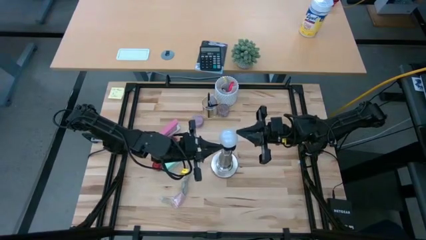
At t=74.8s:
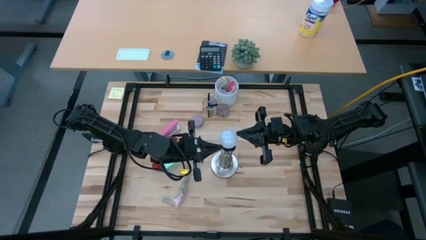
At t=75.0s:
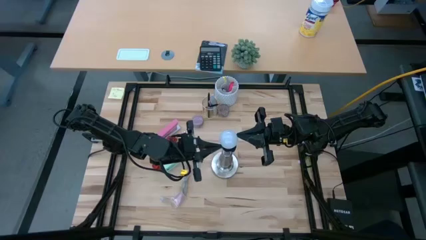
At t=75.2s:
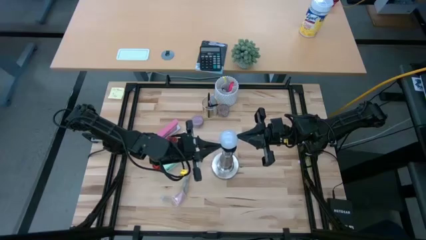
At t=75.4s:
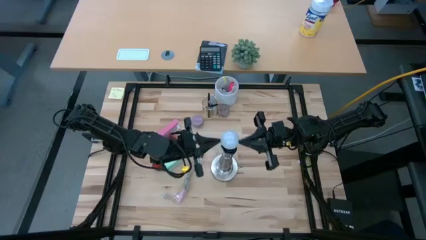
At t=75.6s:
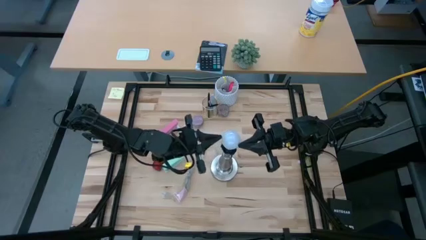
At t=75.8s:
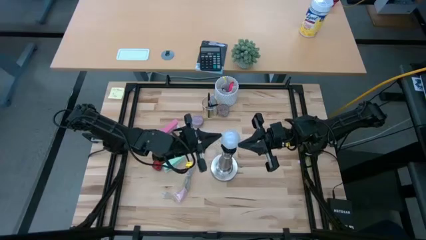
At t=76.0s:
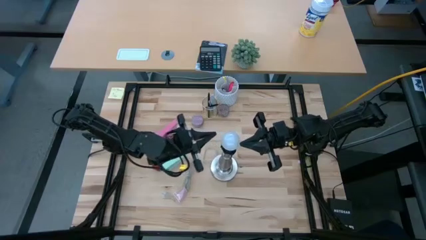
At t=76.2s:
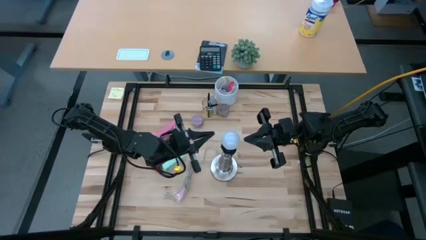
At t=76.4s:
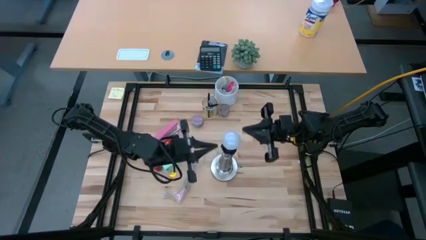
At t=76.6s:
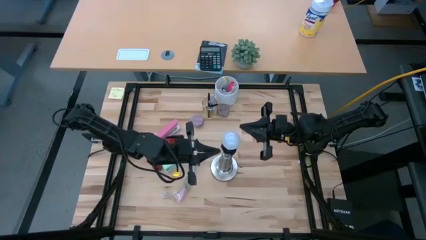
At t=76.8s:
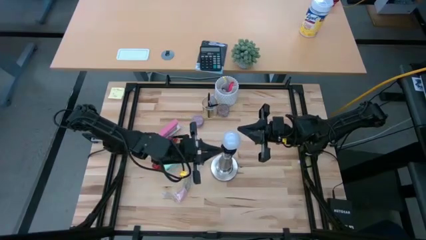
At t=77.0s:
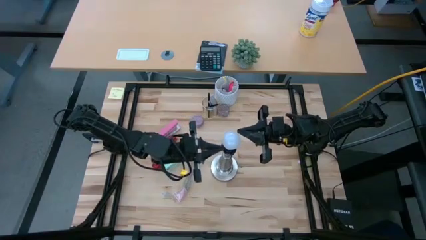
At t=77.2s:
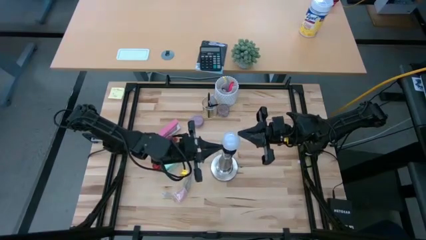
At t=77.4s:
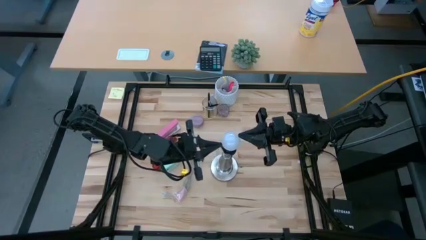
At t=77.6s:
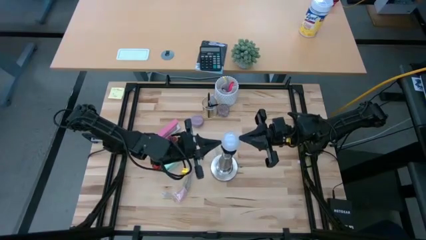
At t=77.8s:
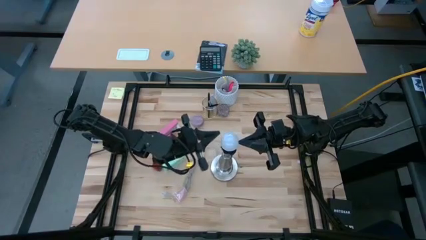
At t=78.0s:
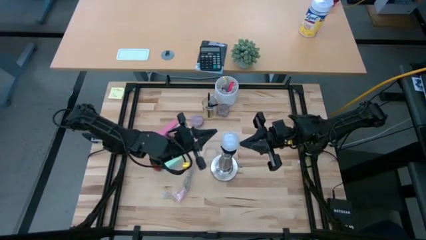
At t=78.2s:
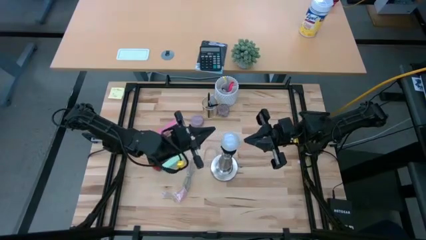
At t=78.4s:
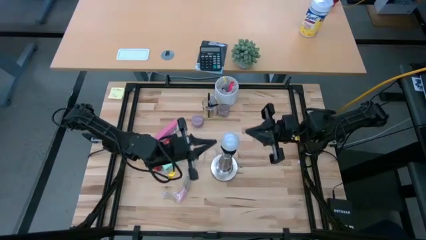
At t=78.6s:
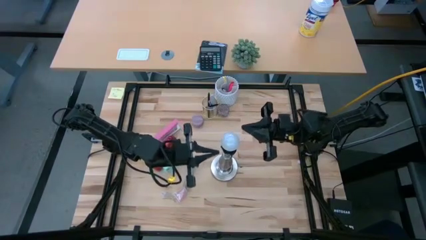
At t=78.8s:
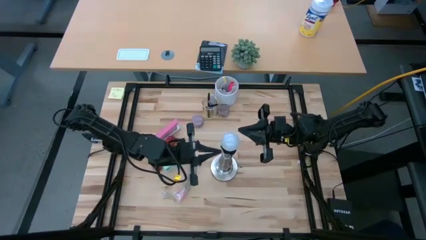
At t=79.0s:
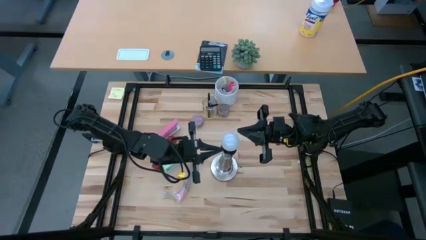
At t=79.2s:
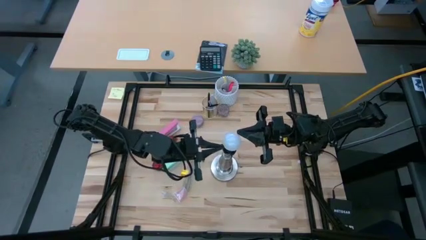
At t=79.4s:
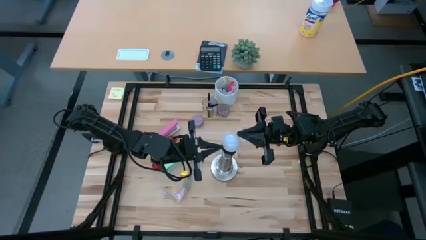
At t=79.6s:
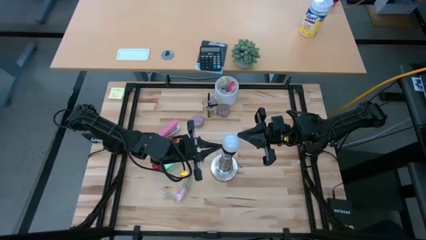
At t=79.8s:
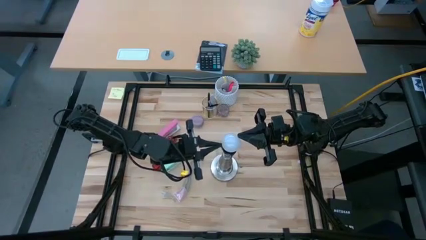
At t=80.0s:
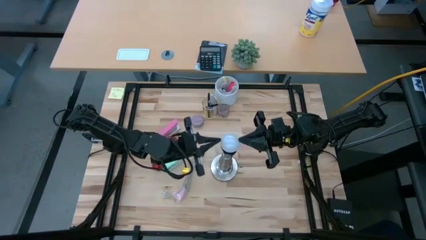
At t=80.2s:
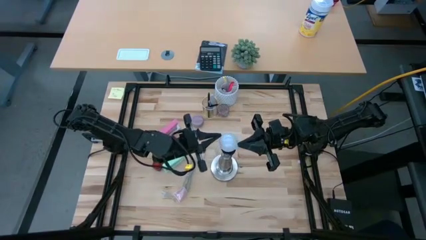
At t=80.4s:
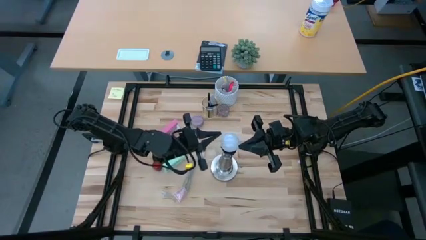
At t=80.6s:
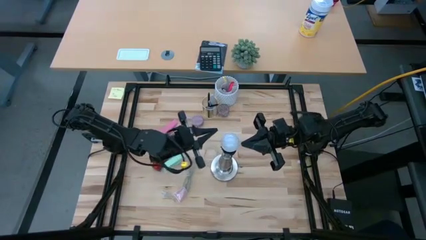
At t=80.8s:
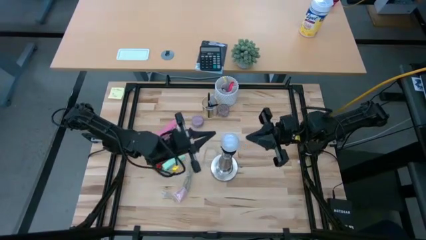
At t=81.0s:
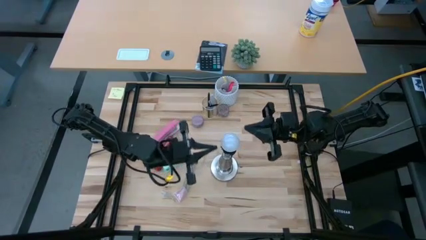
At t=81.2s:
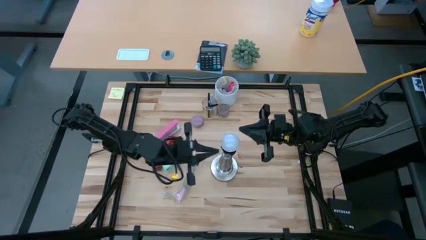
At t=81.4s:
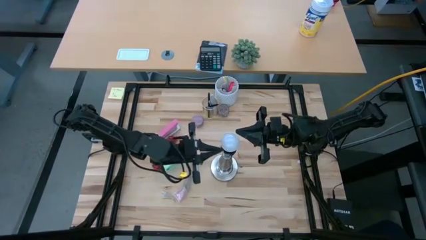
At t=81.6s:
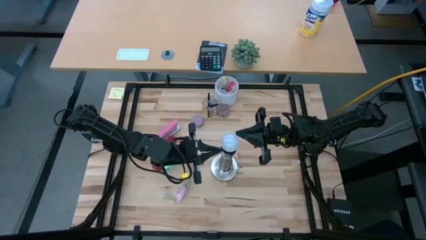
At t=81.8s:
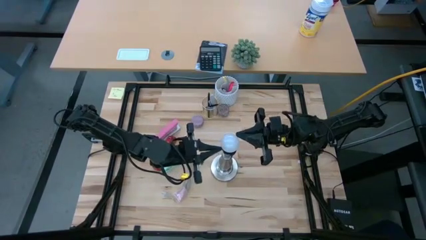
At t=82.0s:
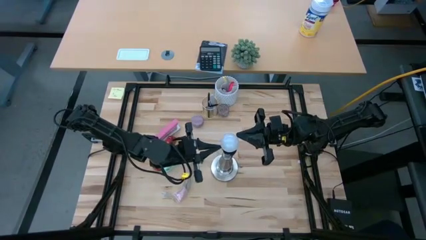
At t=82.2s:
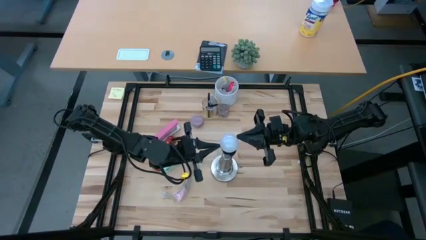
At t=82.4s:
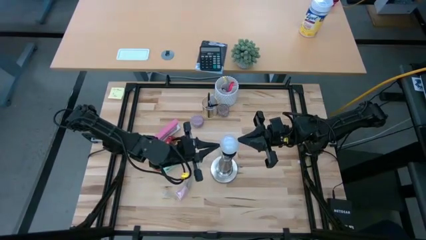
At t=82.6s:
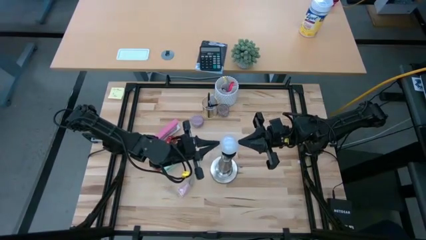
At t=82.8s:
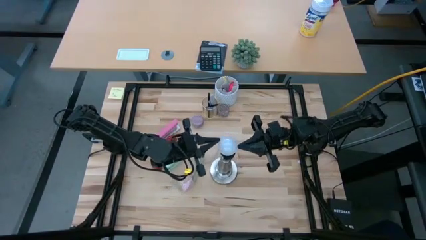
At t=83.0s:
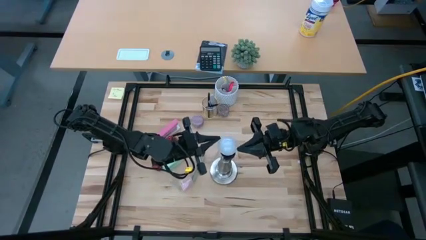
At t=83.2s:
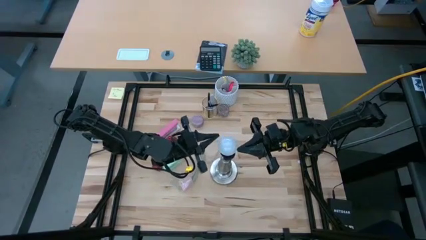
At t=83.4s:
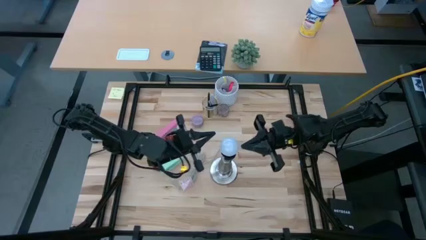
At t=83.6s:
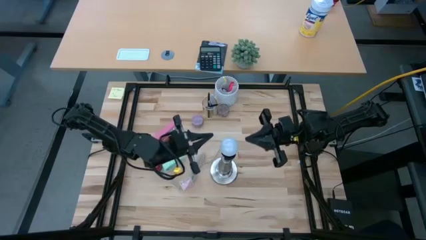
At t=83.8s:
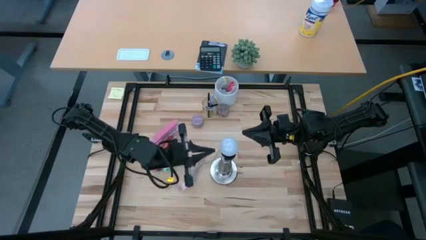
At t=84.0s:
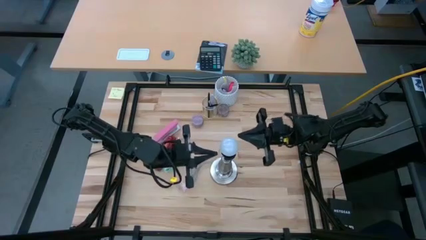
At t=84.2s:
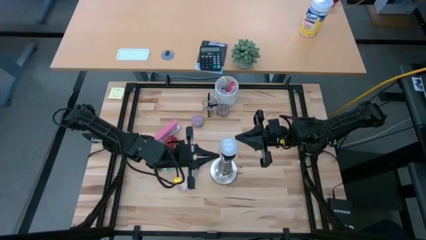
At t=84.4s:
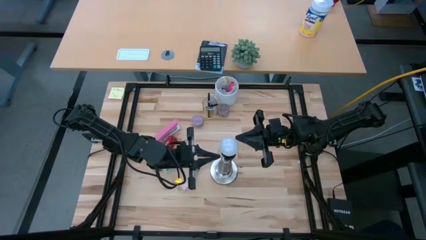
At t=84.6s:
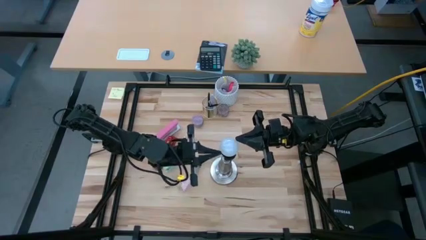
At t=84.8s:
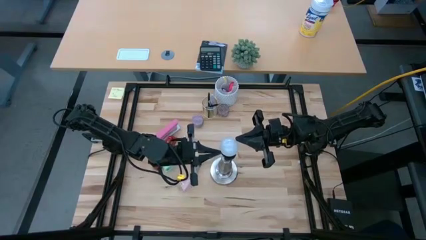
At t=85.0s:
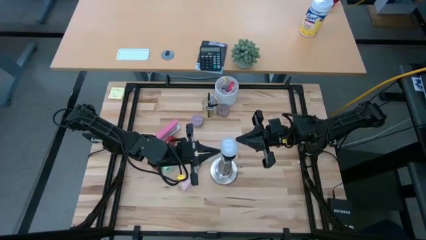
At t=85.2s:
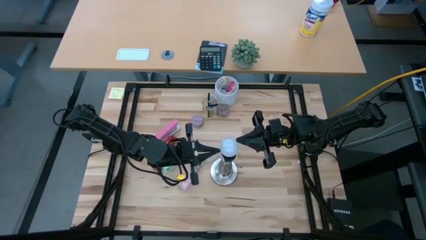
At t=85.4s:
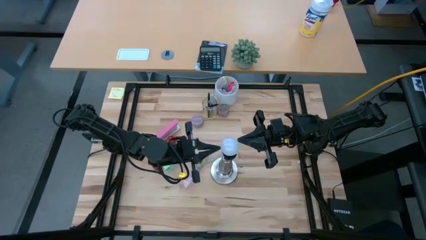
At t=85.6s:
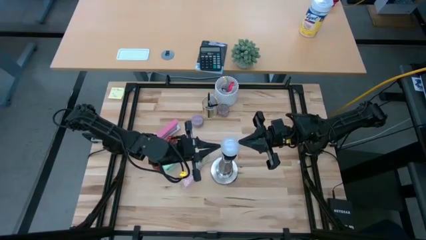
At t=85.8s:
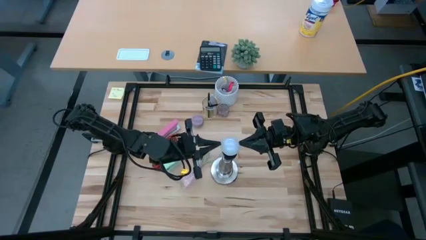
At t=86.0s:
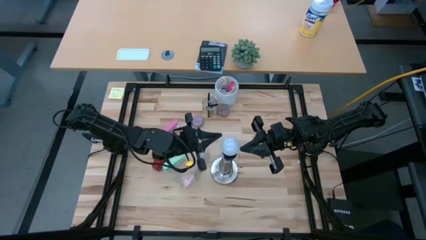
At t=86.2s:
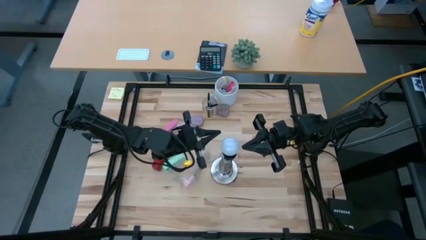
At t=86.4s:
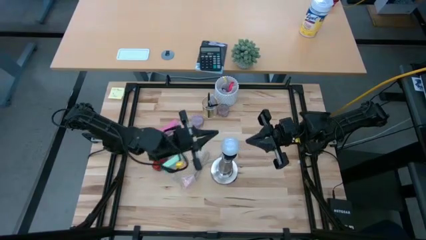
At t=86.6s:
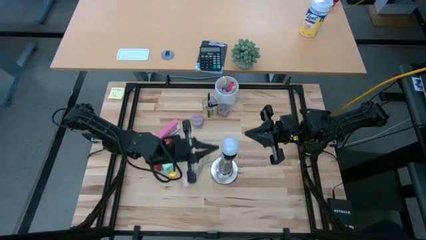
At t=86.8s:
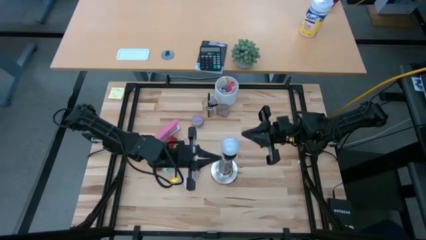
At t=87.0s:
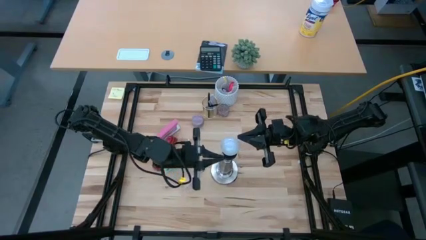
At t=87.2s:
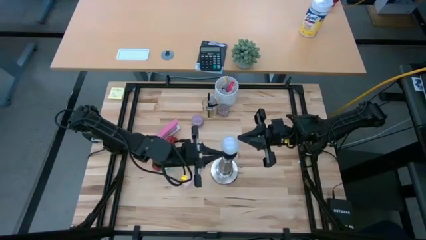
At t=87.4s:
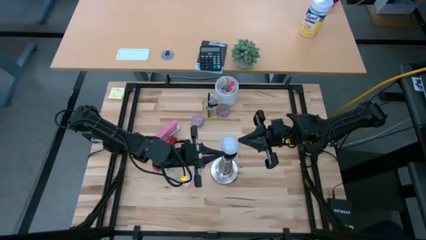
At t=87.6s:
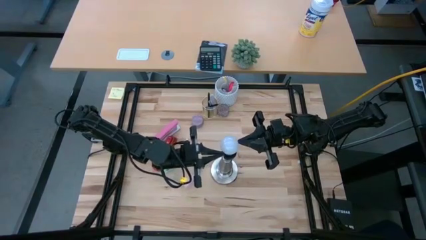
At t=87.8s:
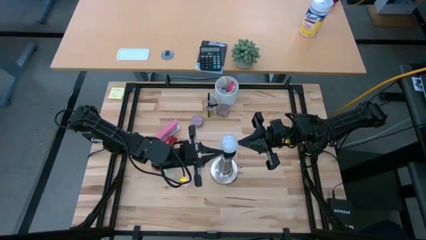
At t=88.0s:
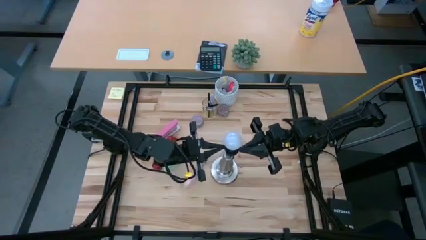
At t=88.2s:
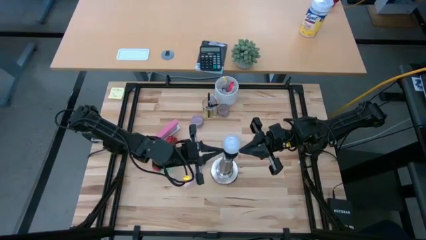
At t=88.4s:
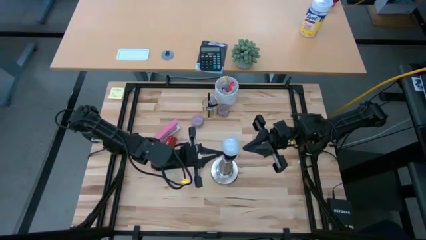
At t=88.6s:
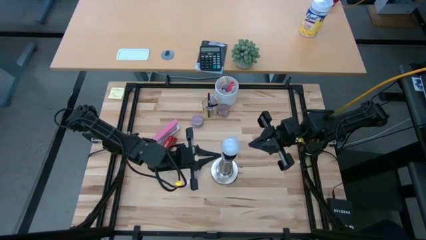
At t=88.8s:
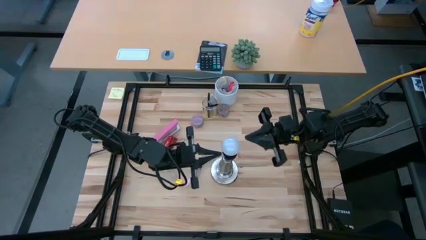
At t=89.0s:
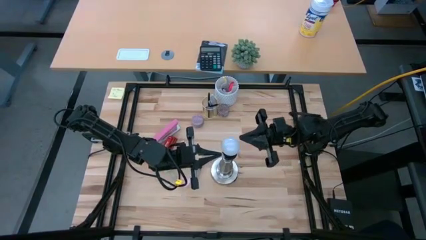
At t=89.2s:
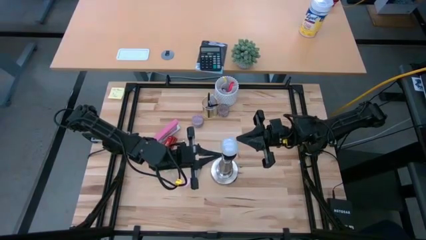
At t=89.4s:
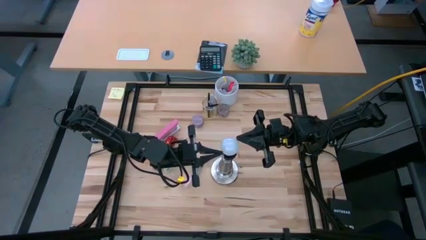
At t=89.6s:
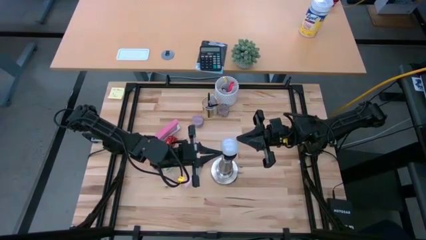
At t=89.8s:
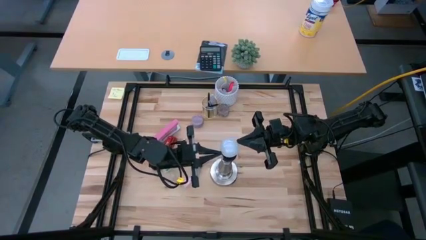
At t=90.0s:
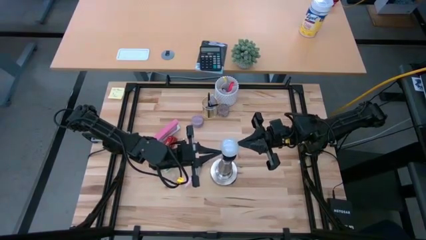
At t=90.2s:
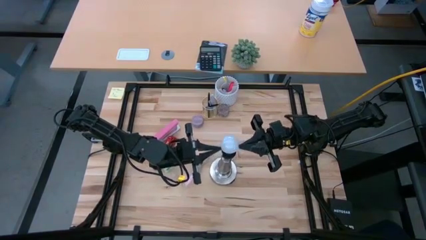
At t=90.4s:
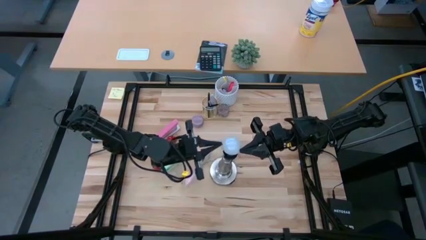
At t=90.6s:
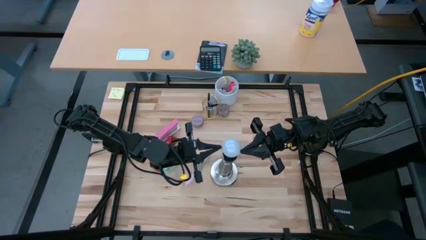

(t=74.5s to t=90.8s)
Task: Screw lightbulb
Insert the lightbulb to the lamp
